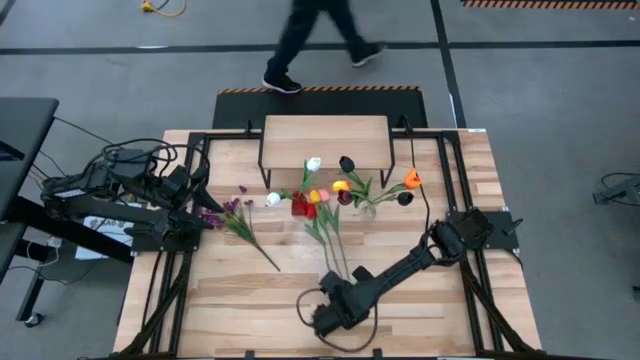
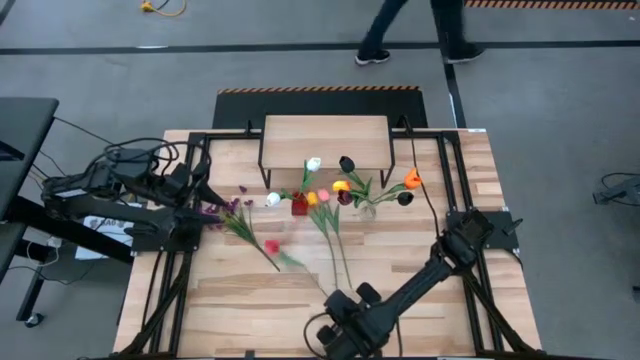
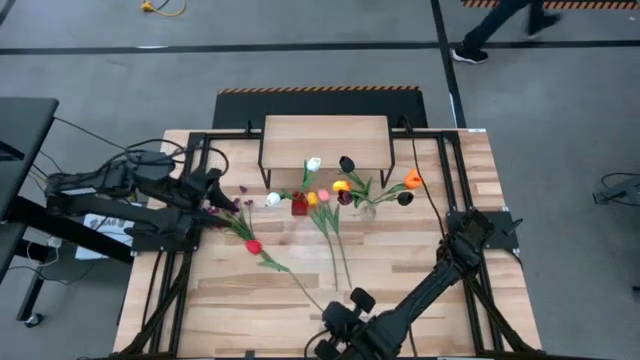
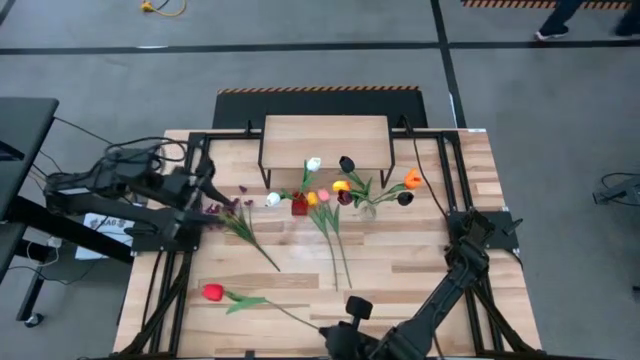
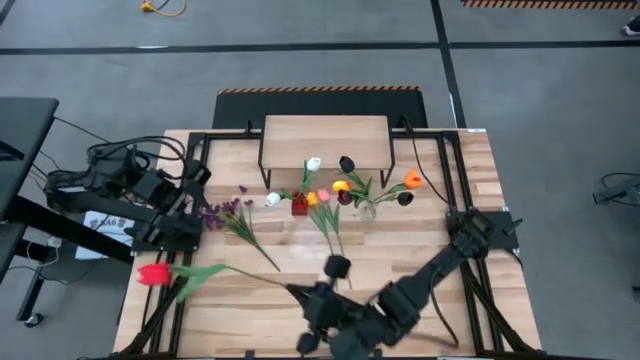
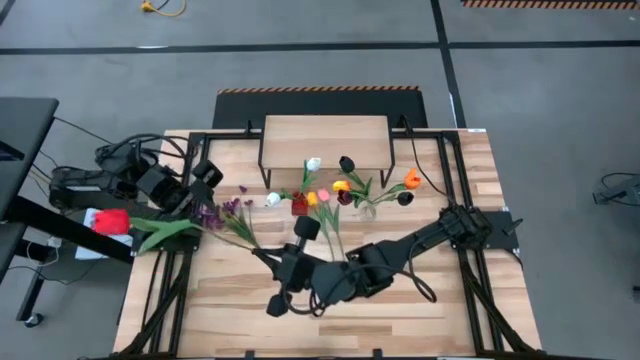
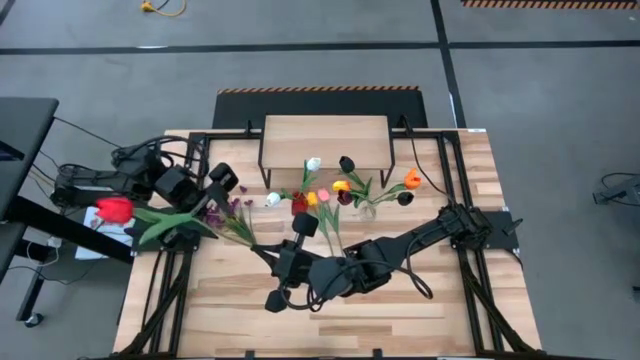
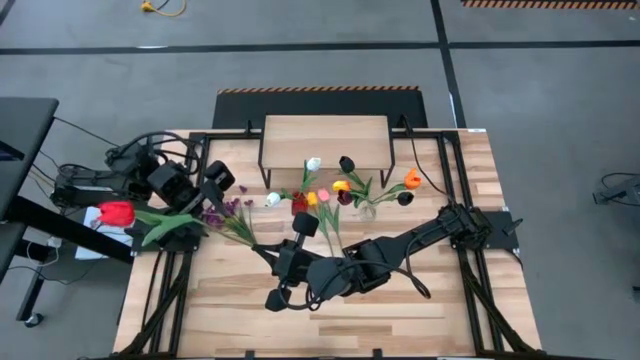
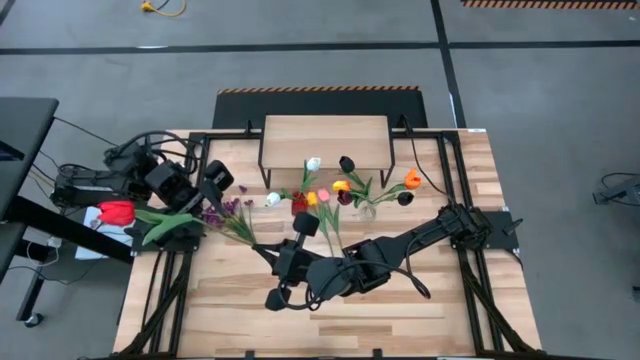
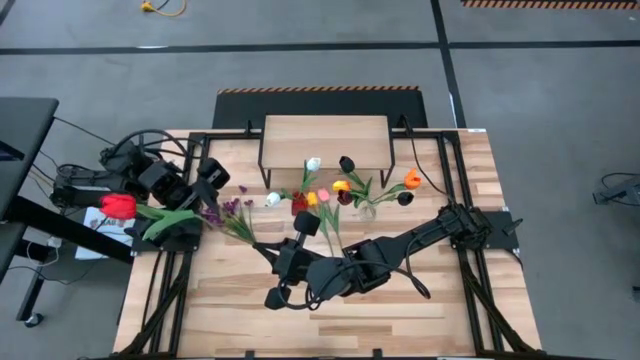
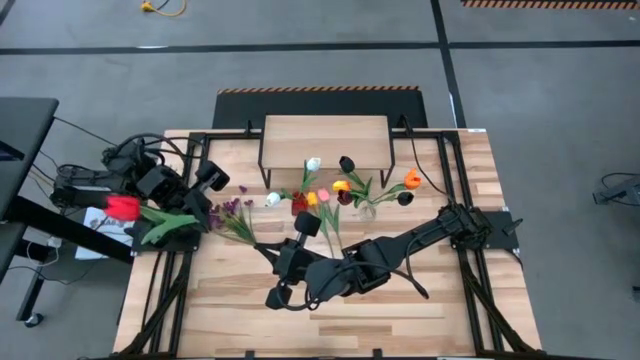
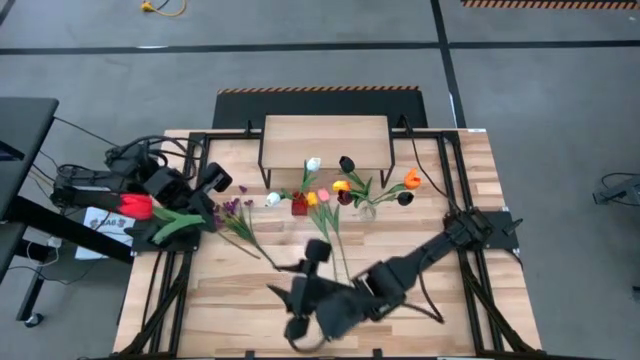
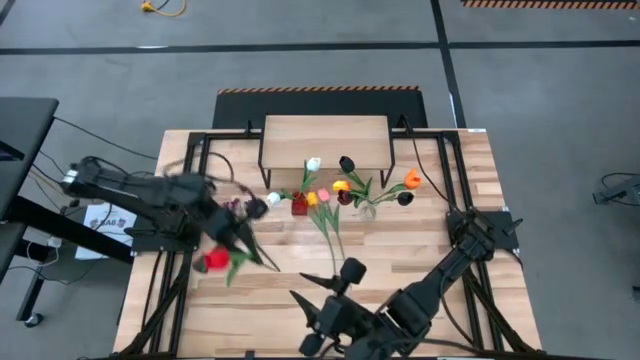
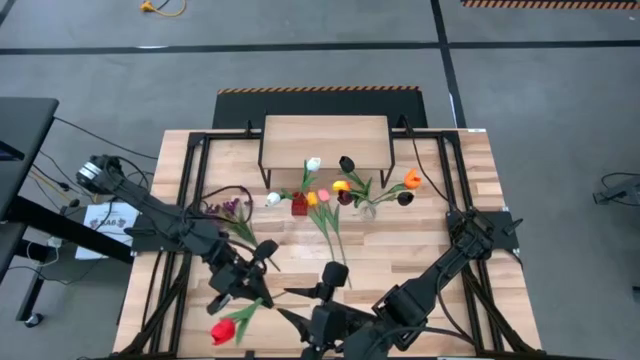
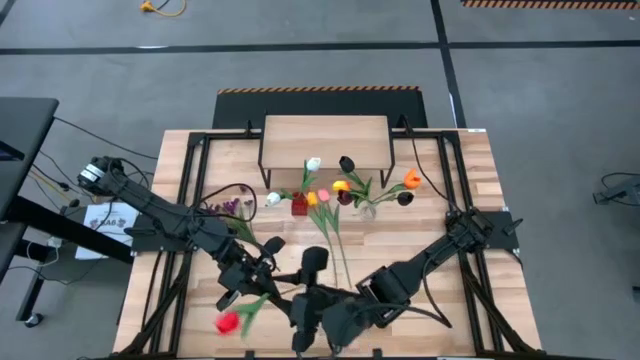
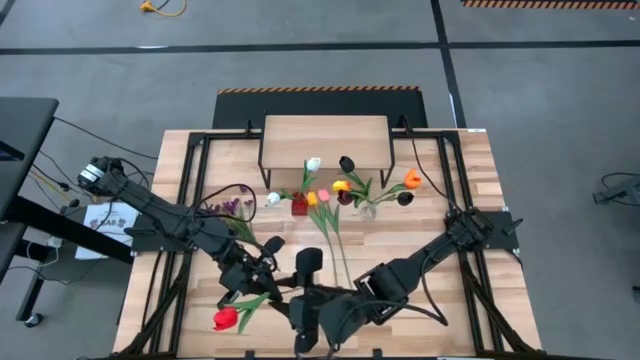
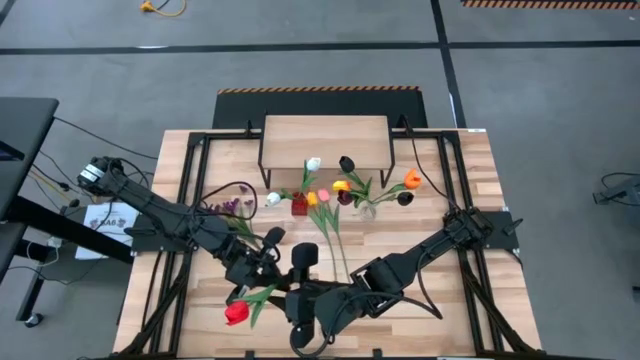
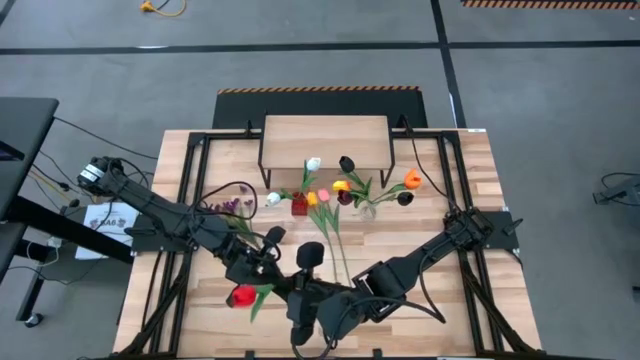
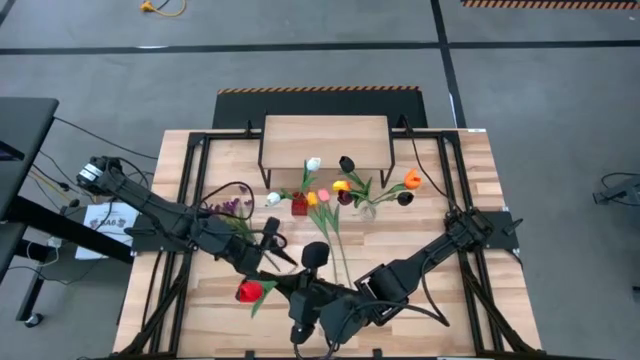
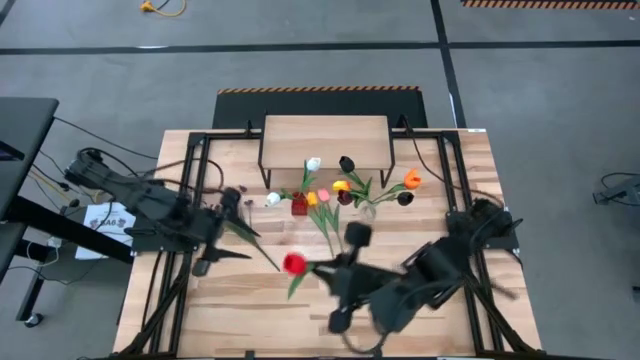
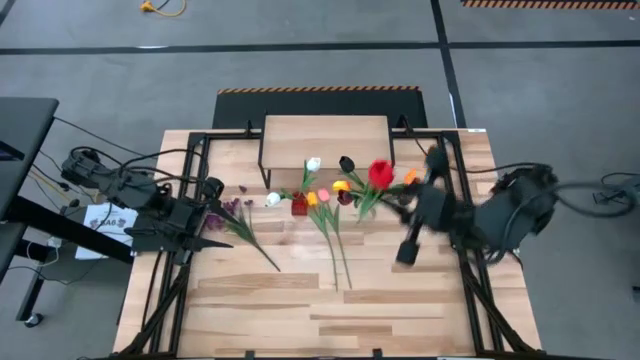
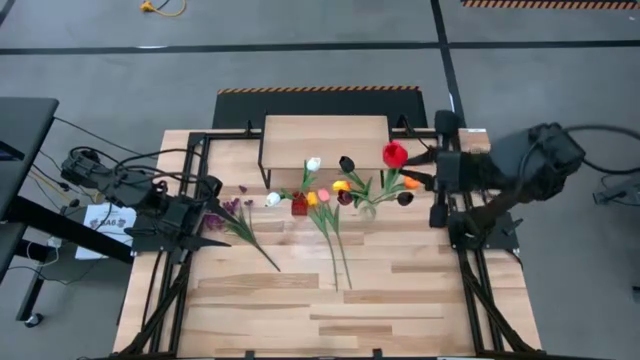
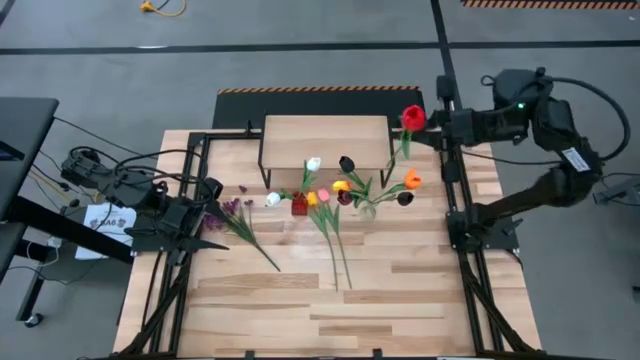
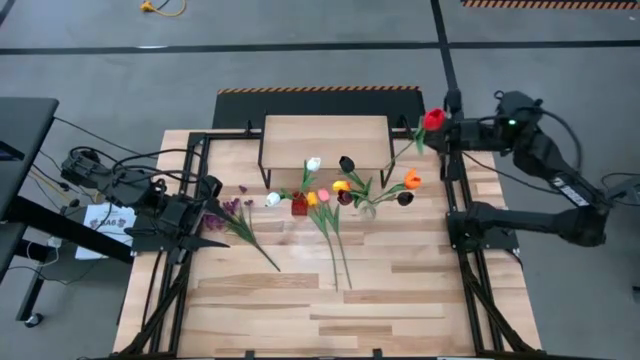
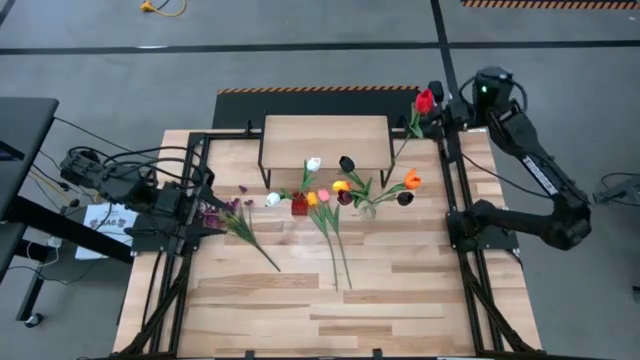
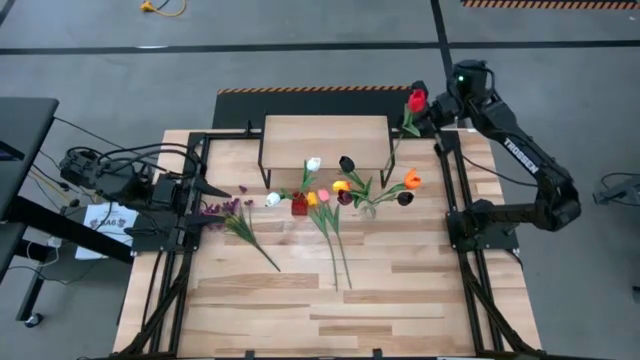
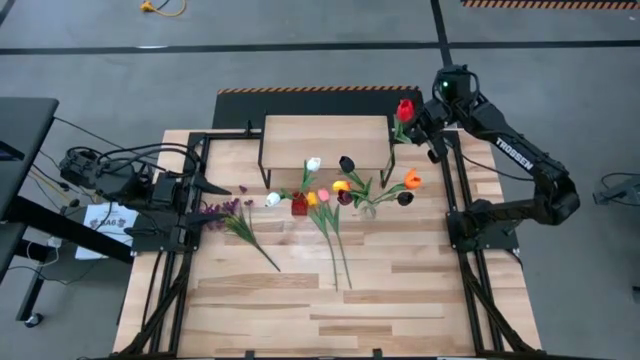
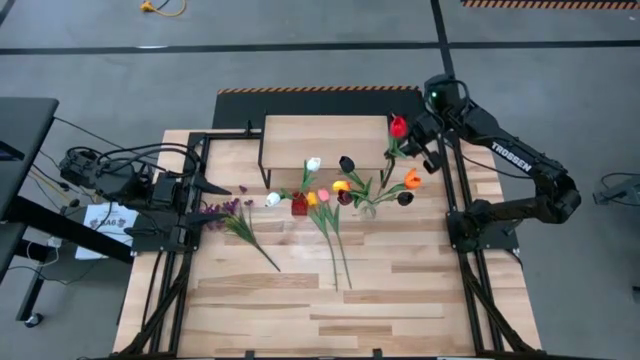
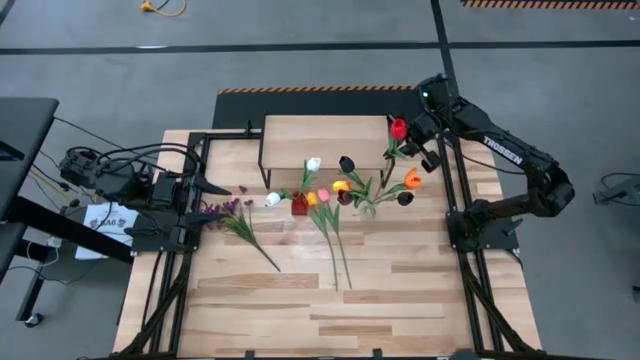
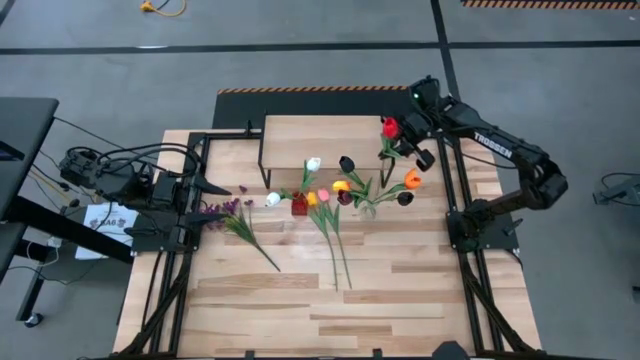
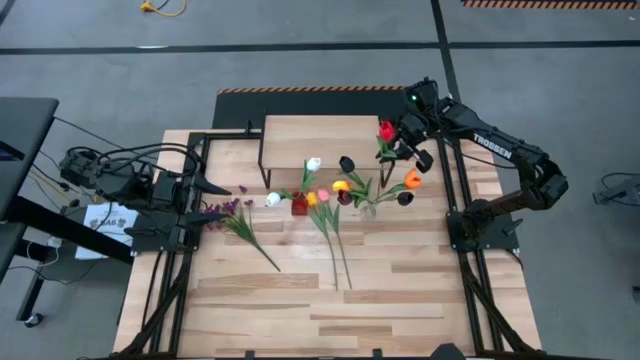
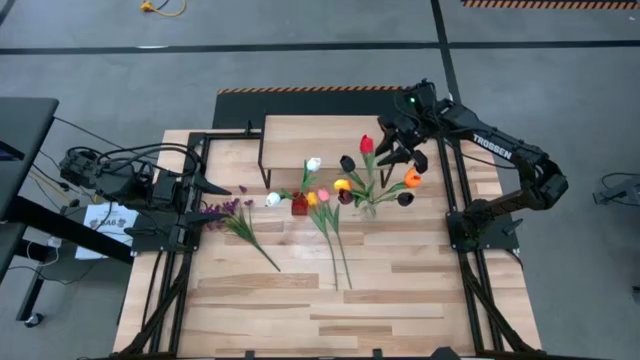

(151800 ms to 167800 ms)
Task: Pick and place flowers into a vace then onto a shelf
Put the red flower into the transparent vase

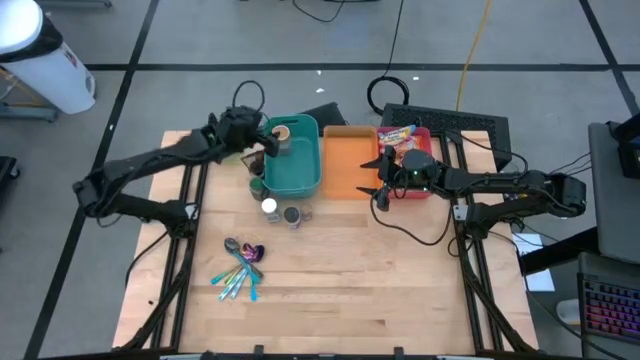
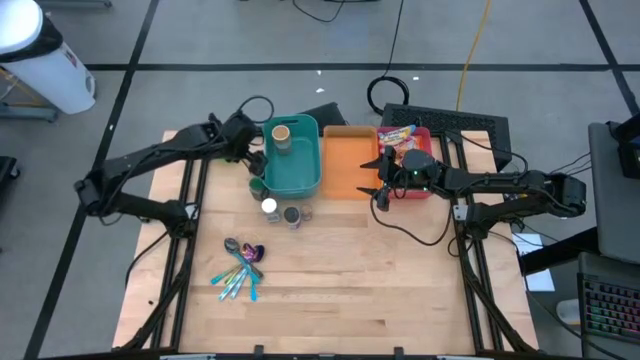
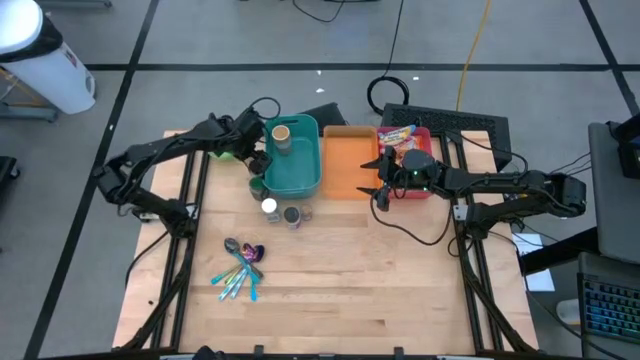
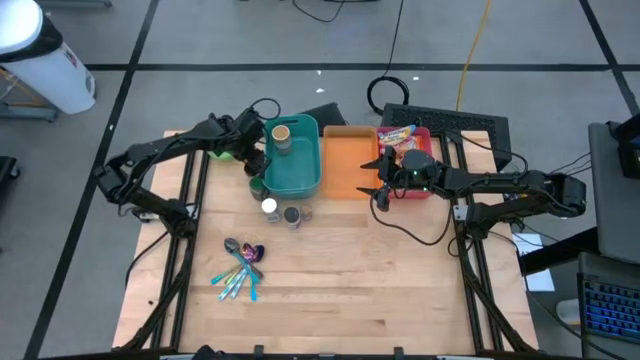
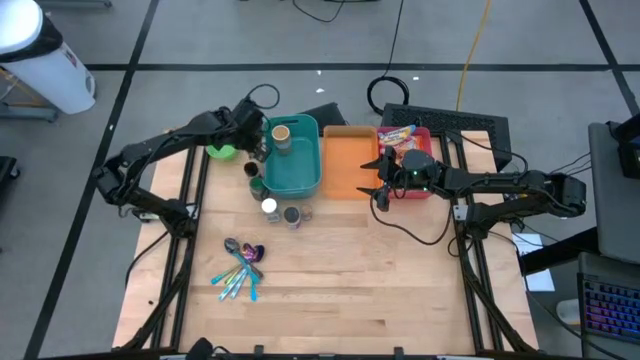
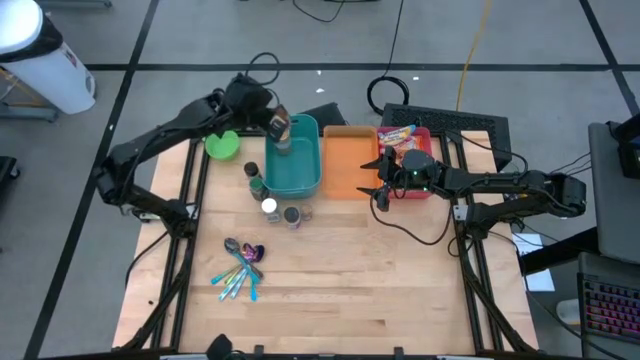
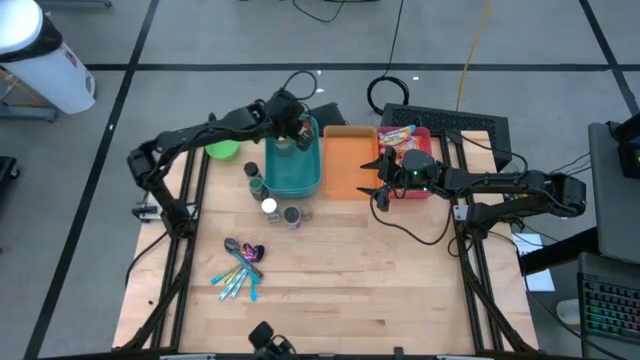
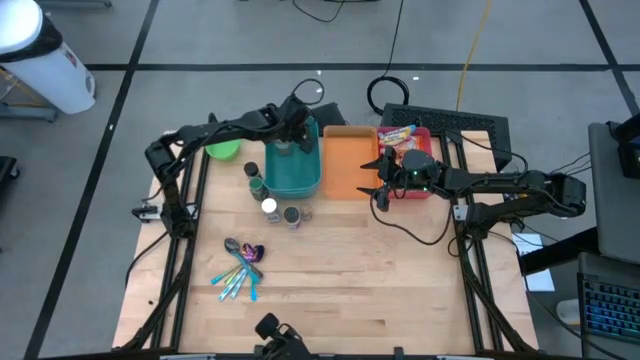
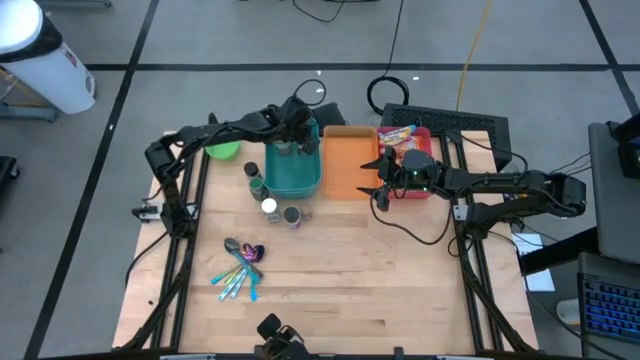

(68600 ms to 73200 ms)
Task: Pick & Place Food Item
Put the orange seasoning pack into the green bin
